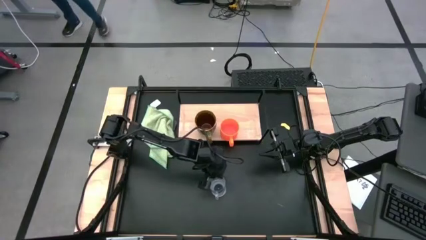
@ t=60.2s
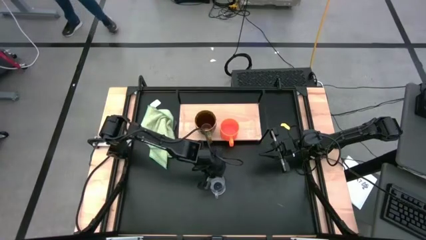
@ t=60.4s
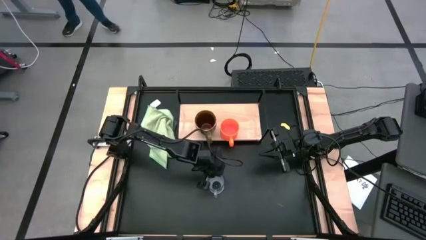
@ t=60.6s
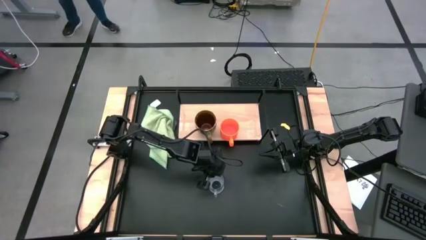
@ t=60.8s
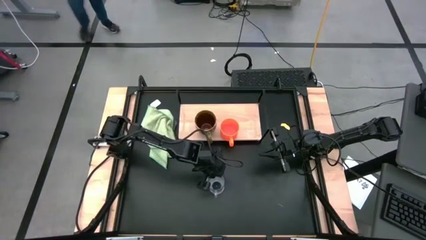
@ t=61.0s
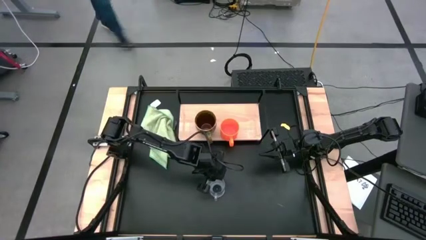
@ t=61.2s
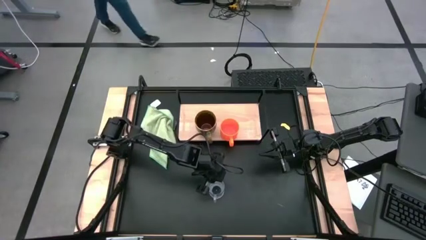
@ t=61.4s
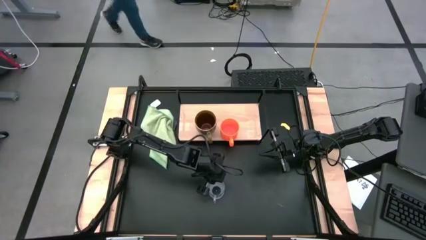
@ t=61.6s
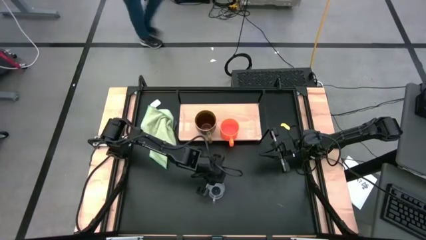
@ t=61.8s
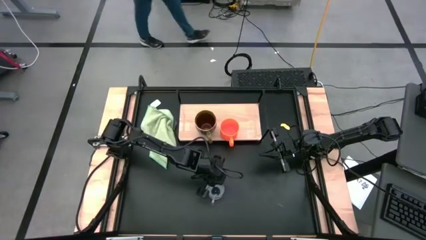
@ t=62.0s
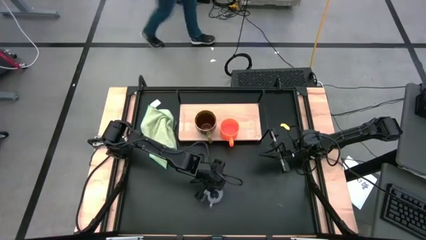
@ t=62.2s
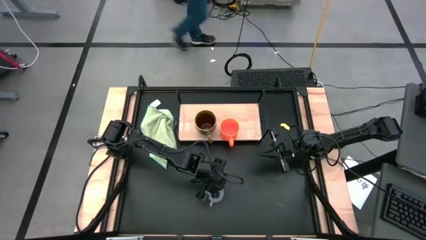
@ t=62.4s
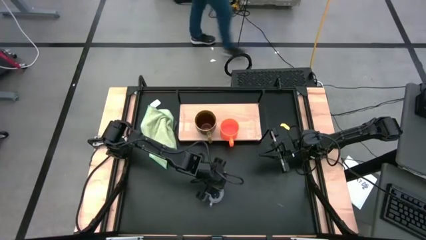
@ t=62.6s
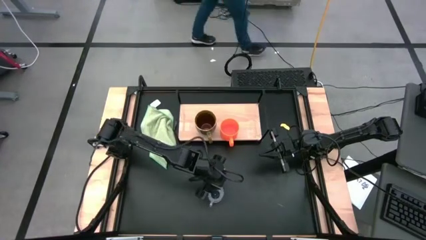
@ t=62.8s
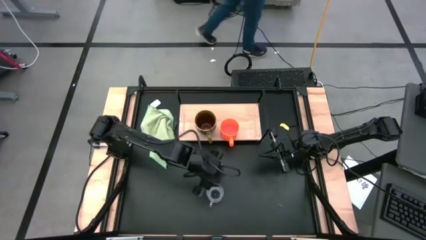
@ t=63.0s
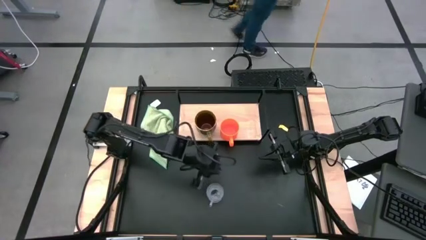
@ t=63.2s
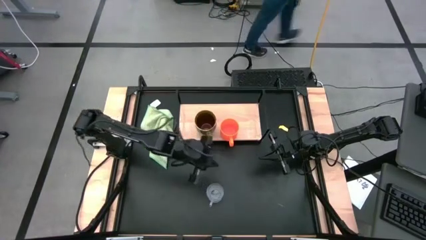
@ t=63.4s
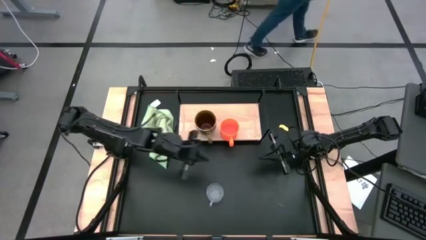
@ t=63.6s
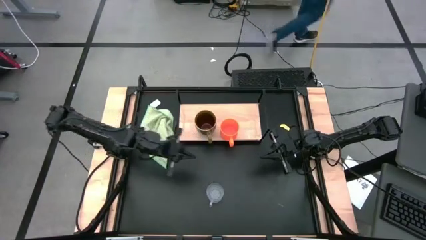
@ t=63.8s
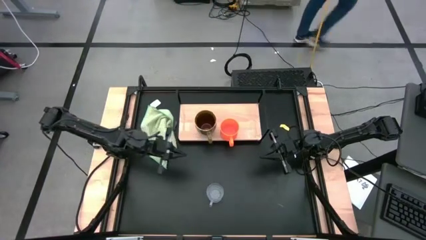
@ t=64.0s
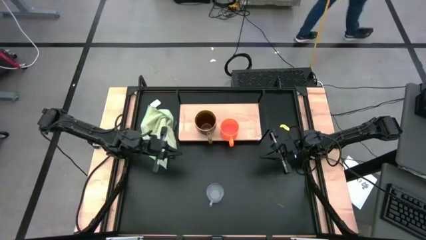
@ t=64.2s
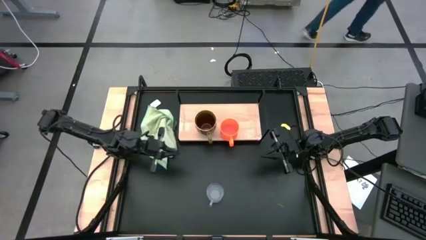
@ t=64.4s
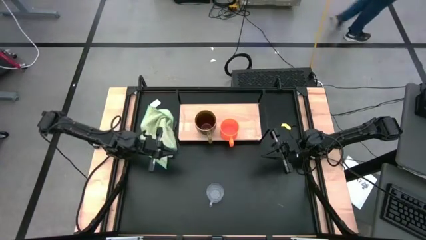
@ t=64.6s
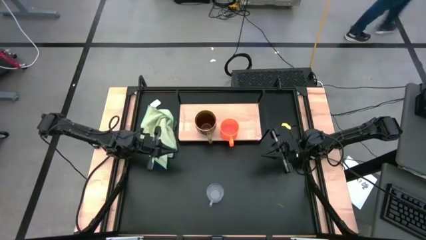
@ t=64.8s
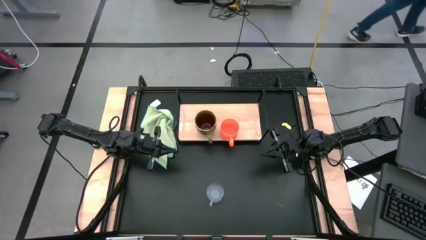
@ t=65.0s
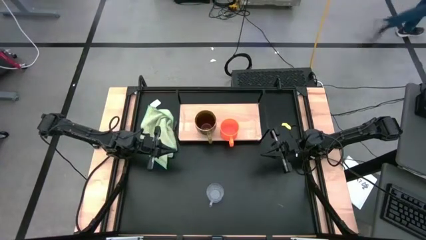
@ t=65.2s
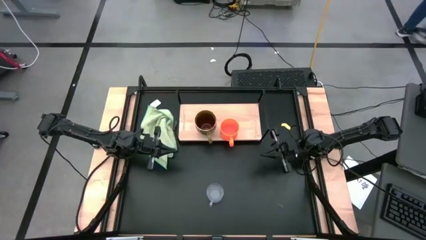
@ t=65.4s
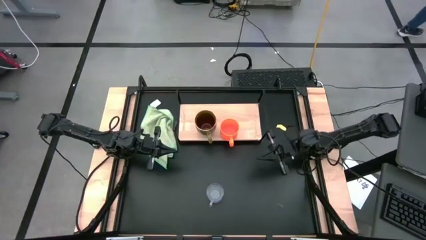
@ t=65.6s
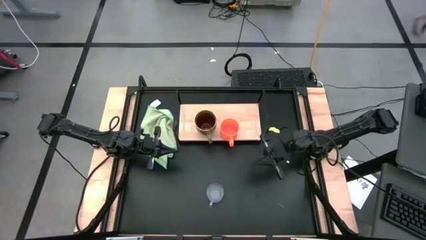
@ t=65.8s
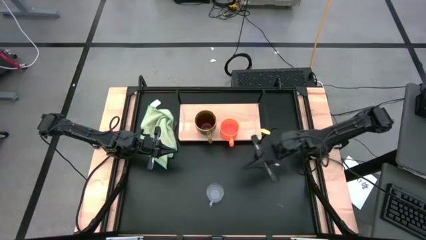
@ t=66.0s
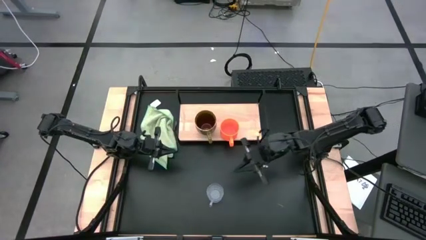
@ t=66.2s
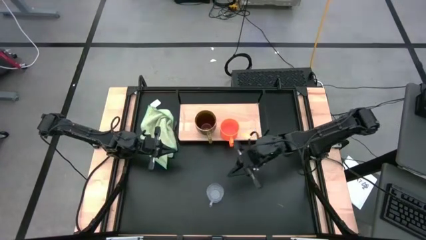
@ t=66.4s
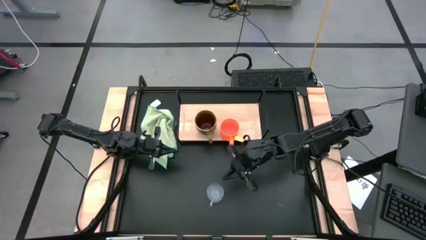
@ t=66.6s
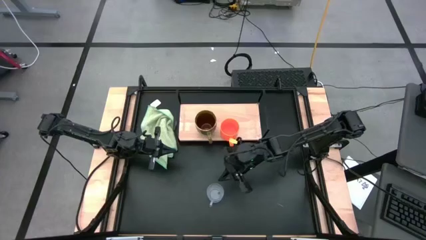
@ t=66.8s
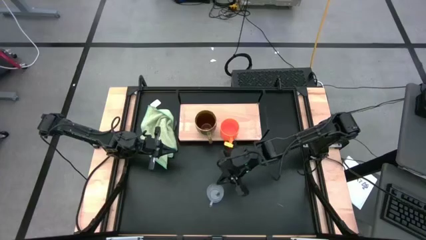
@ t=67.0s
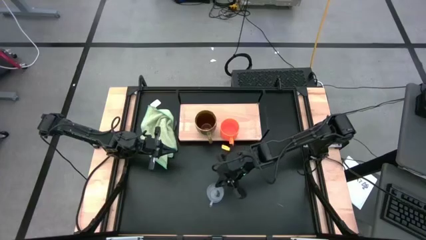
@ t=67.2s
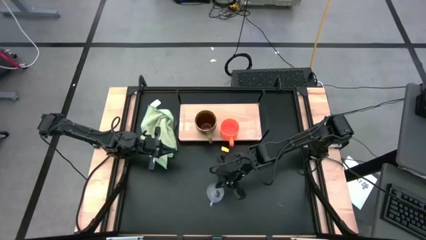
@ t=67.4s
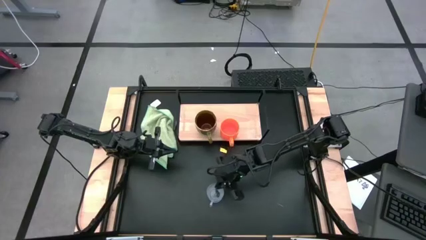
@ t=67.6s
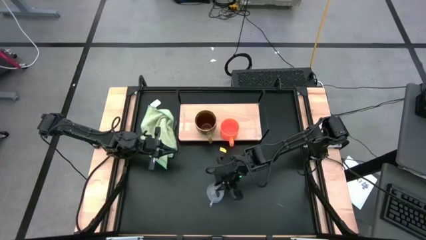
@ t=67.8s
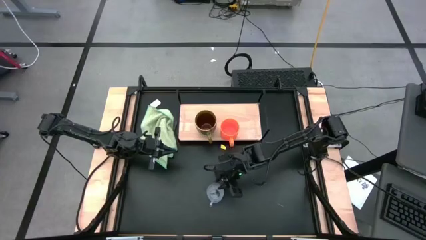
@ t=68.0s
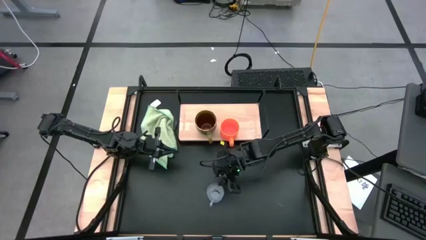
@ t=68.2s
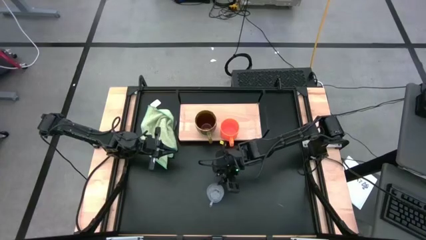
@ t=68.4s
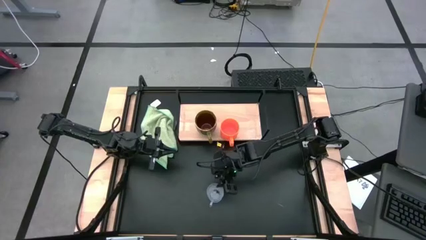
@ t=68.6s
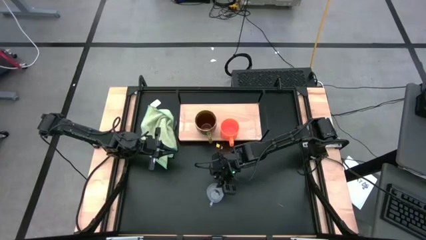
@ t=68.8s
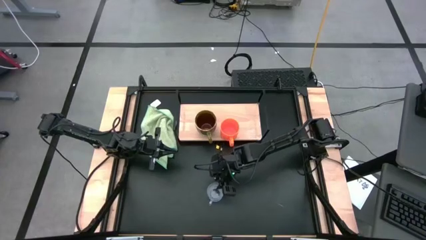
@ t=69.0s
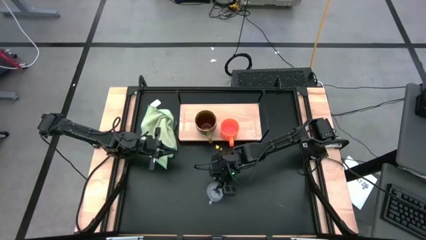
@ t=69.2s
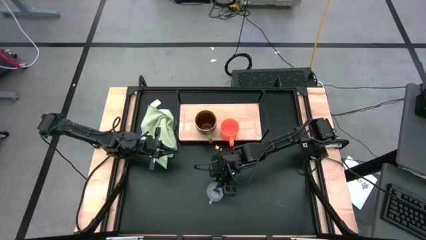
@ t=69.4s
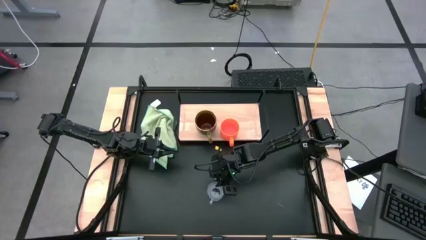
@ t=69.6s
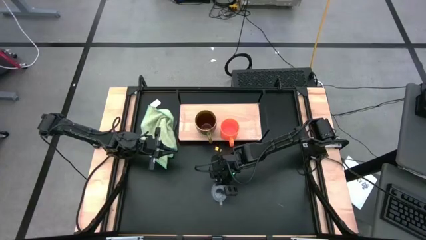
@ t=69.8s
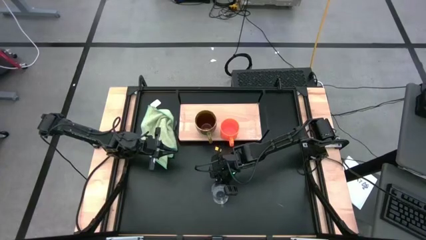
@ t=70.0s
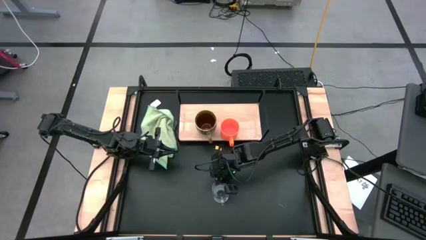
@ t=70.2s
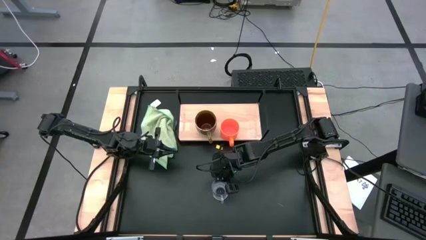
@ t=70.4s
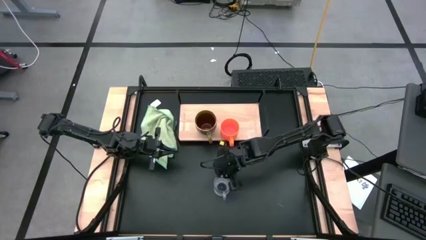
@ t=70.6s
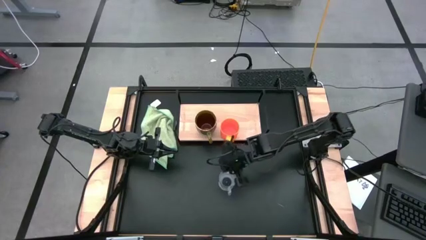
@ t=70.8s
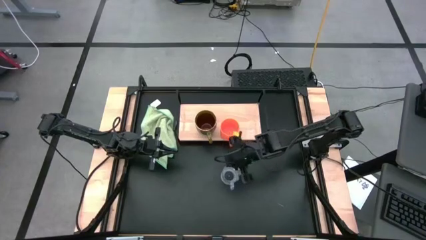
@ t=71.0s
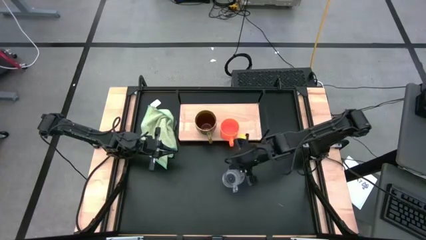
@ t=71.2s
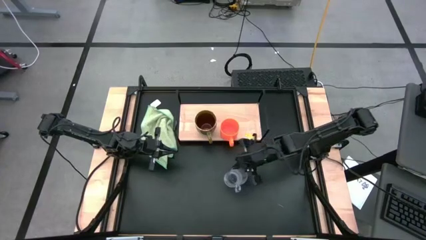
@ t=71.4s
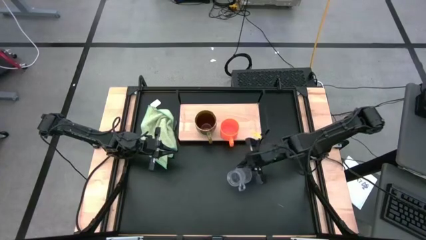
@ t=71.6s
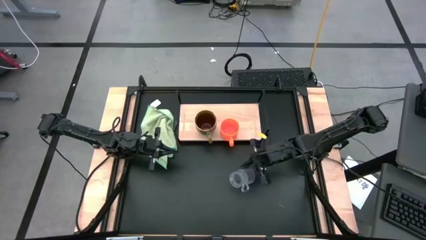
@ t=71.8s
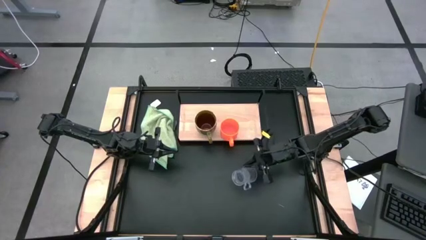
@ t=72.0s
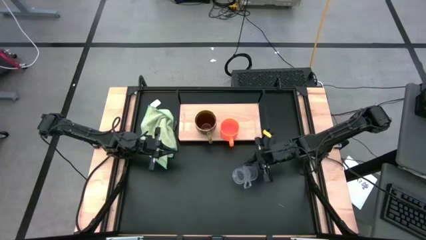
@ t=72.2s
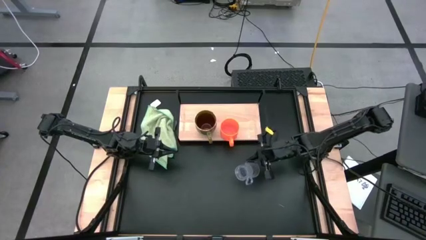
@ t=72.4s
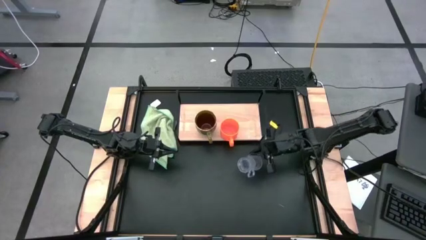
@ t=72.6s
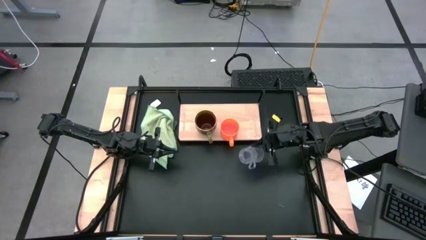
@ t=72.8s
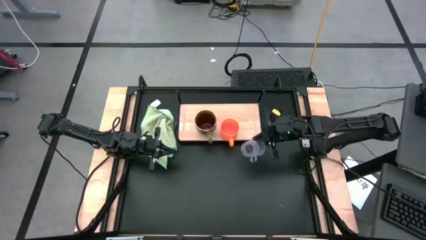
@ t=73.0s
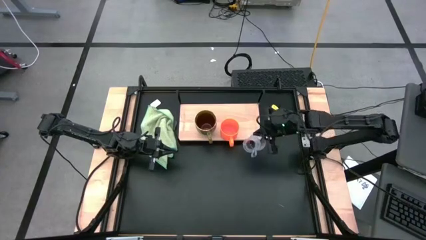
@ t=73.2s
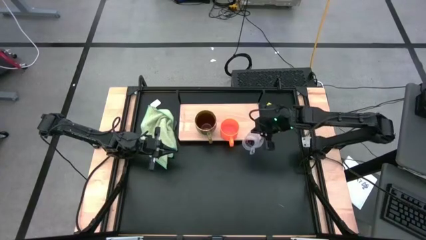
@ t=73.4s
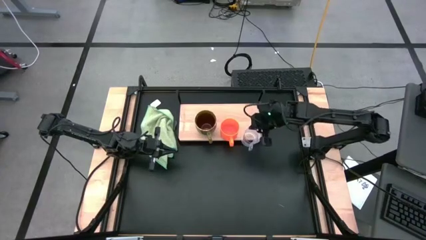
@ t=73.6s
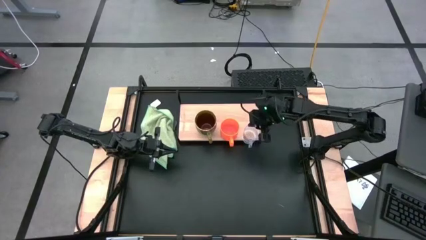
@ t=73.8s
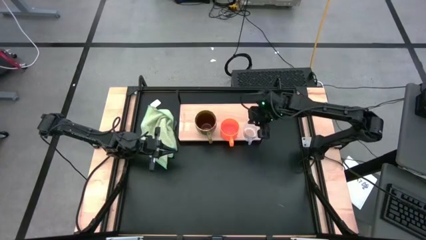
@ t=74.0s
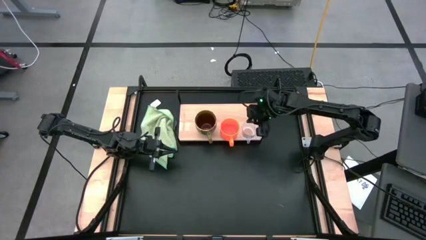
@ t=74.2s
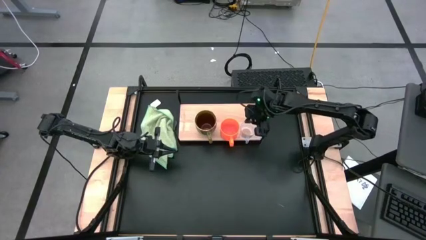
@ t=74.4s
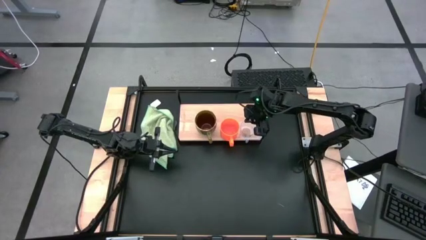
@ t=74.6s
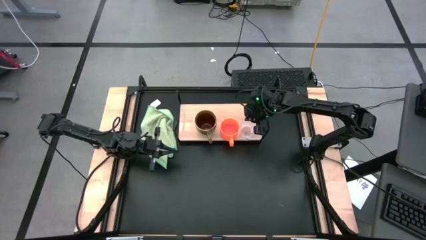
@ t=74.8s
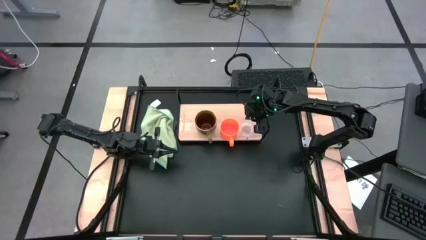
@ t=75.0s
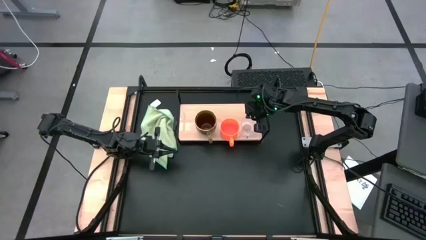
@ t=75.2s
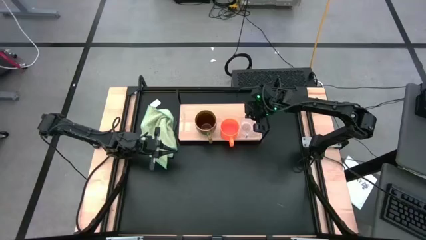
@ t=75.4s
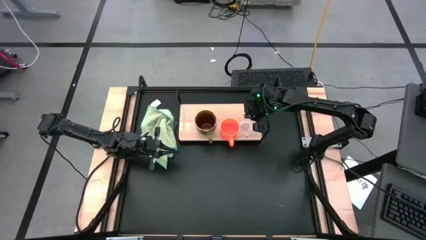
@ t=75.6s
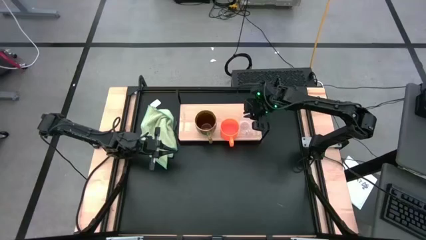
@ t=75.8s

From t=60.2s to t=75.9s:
Task: Stack small to large cups/mugs on shelf
Put the transparent mug to the right of the orange mug on the shelf
